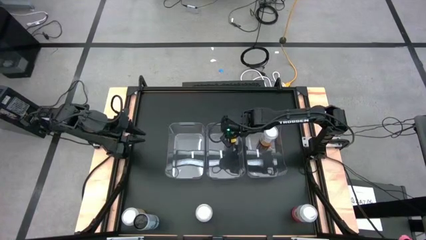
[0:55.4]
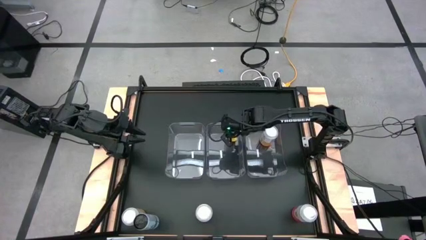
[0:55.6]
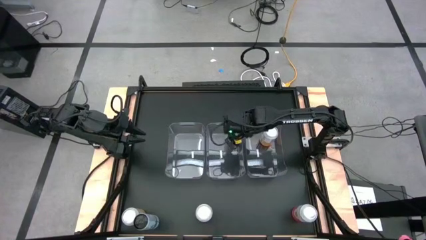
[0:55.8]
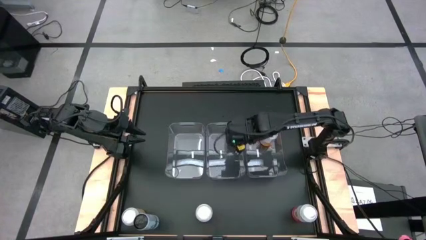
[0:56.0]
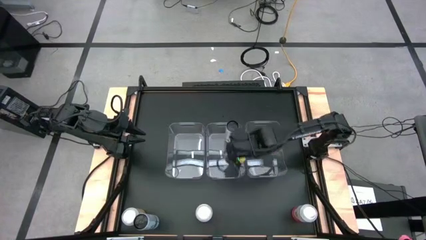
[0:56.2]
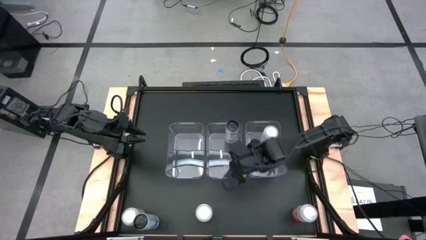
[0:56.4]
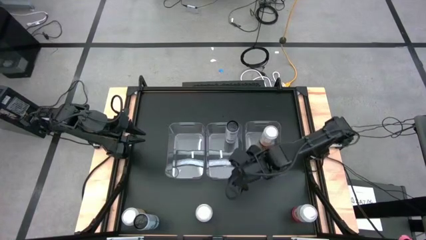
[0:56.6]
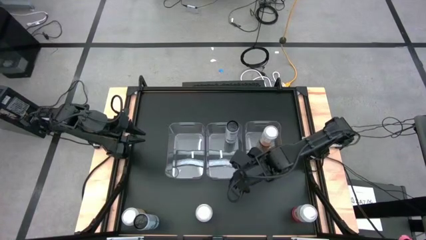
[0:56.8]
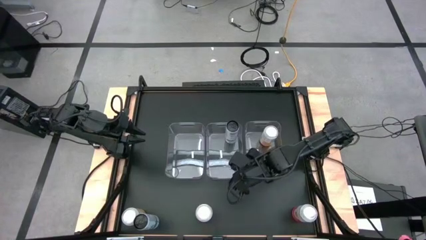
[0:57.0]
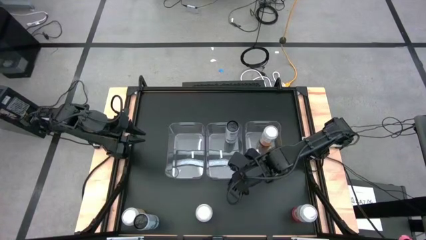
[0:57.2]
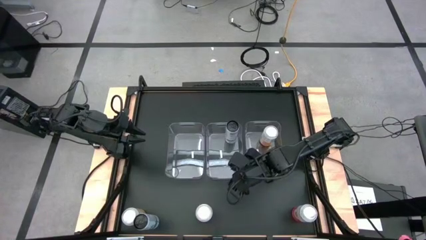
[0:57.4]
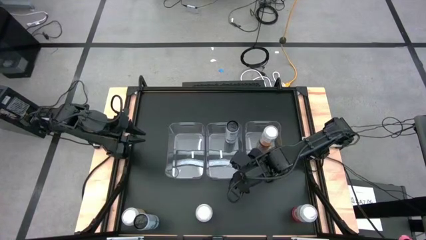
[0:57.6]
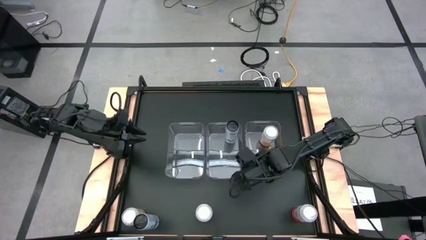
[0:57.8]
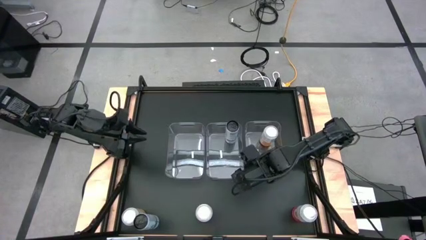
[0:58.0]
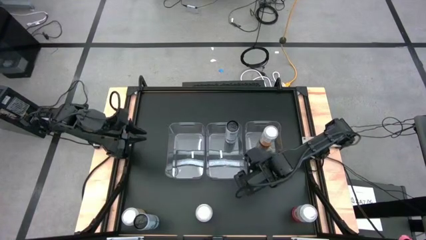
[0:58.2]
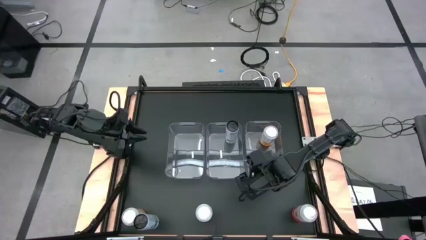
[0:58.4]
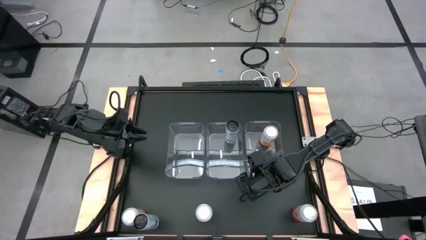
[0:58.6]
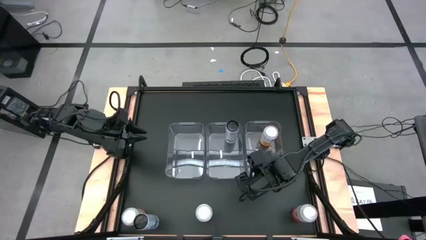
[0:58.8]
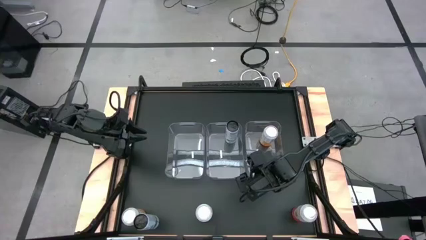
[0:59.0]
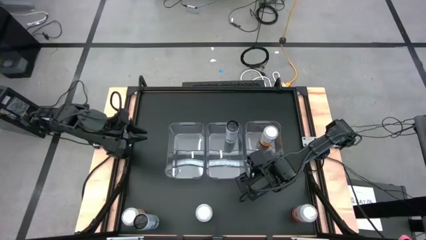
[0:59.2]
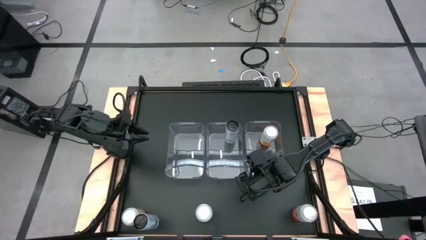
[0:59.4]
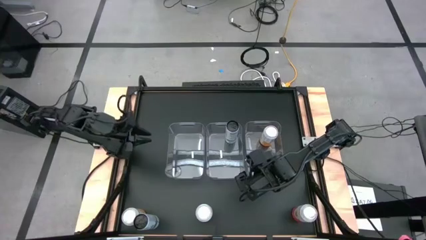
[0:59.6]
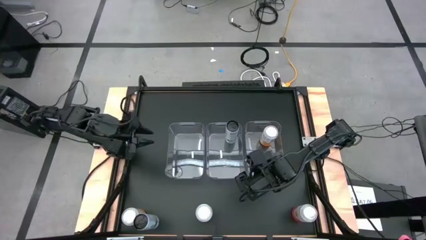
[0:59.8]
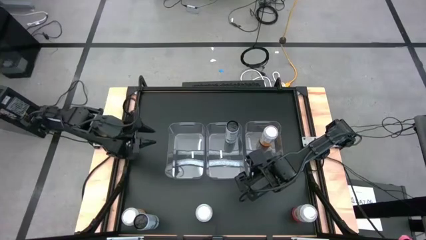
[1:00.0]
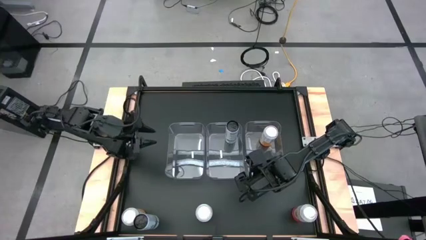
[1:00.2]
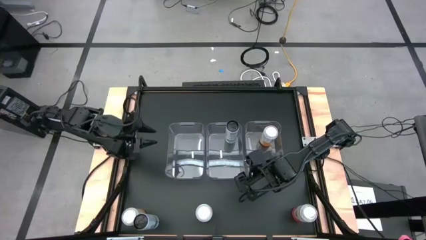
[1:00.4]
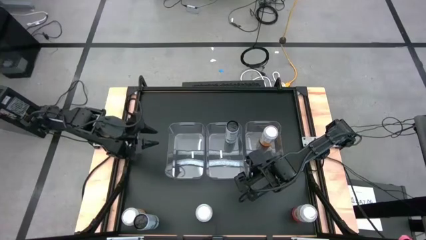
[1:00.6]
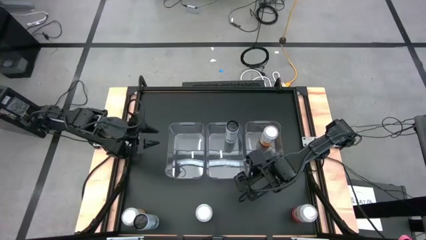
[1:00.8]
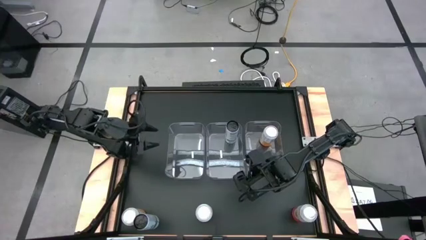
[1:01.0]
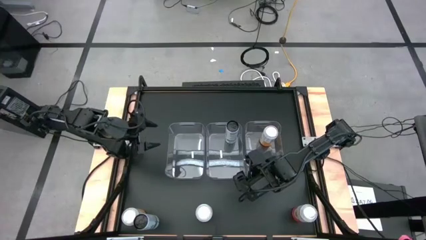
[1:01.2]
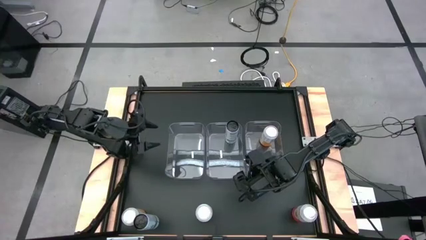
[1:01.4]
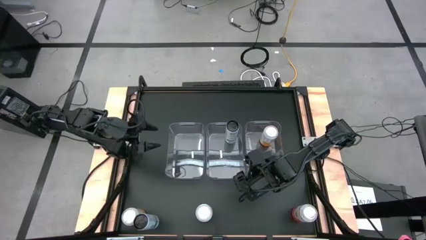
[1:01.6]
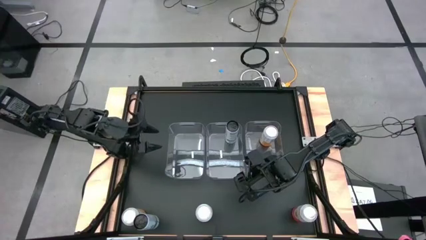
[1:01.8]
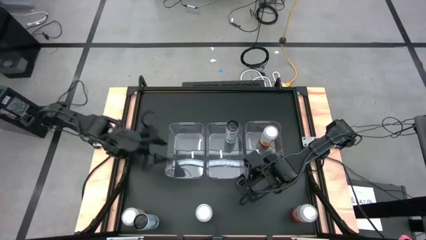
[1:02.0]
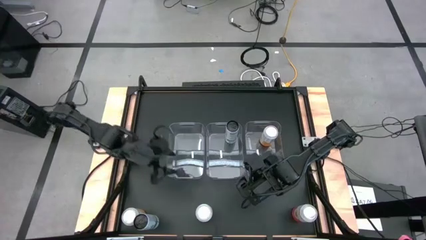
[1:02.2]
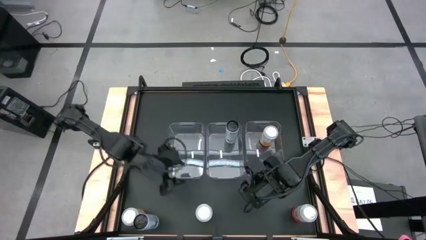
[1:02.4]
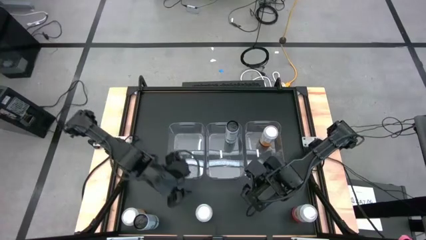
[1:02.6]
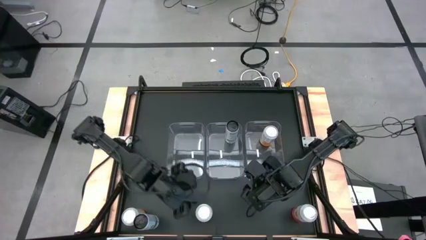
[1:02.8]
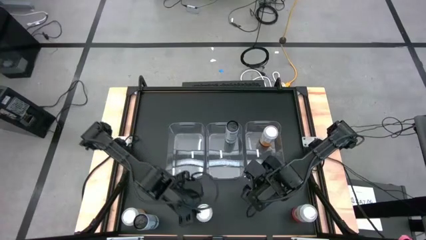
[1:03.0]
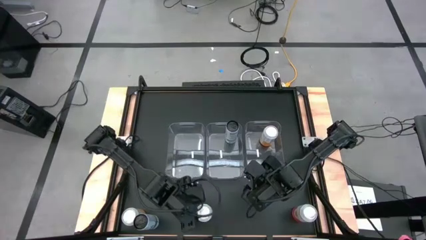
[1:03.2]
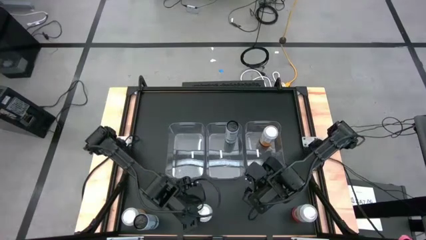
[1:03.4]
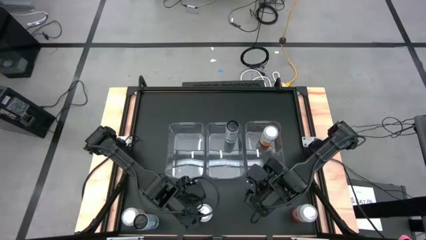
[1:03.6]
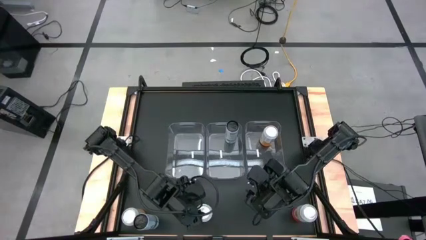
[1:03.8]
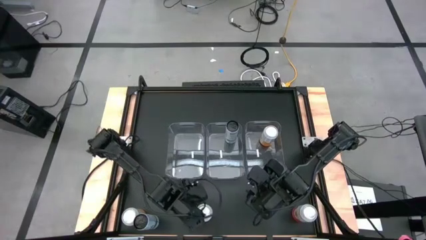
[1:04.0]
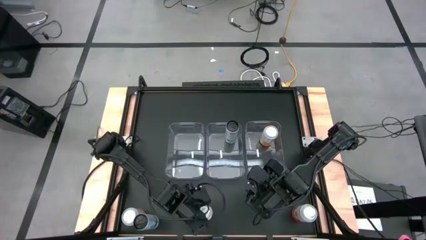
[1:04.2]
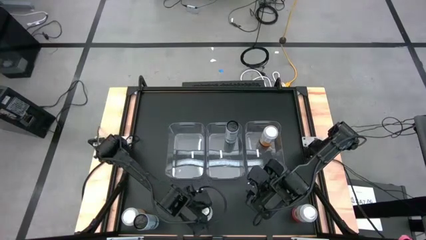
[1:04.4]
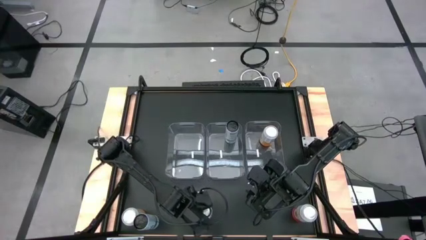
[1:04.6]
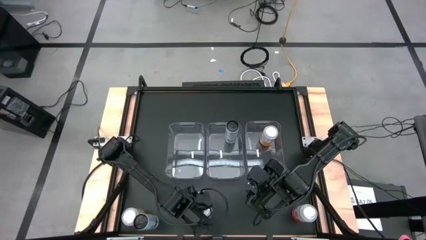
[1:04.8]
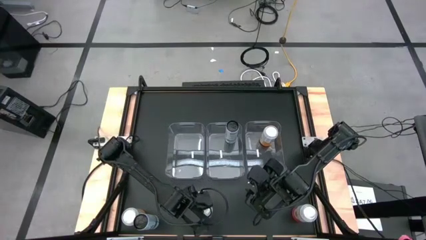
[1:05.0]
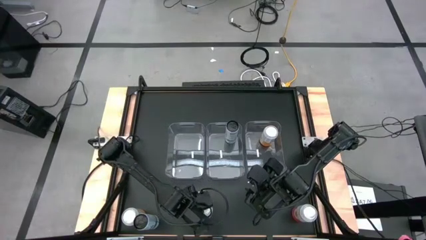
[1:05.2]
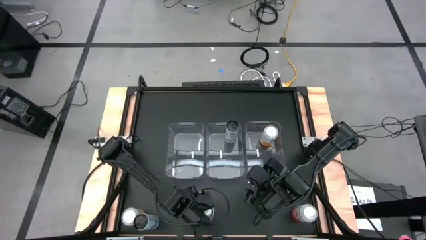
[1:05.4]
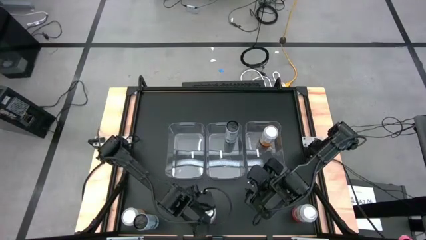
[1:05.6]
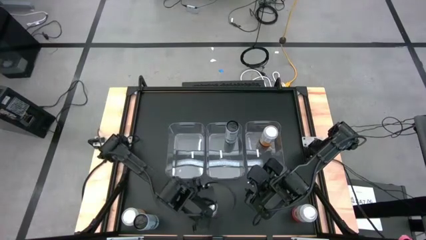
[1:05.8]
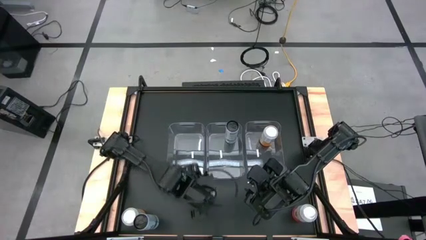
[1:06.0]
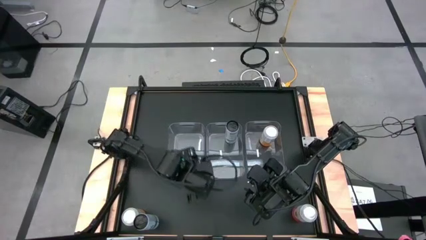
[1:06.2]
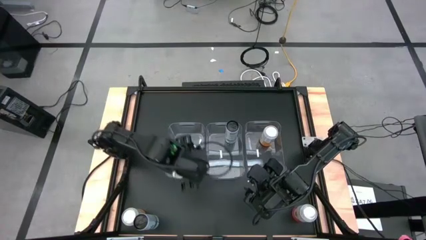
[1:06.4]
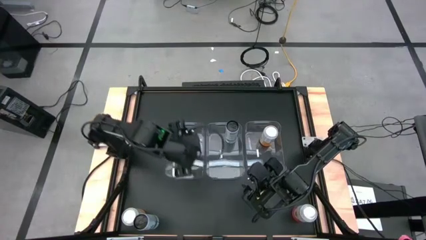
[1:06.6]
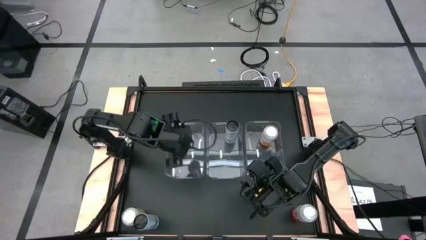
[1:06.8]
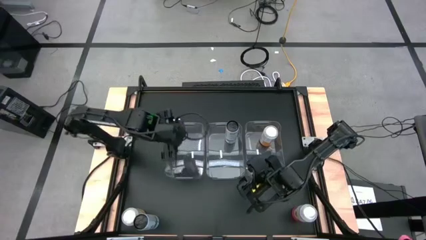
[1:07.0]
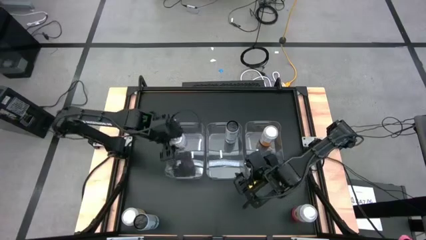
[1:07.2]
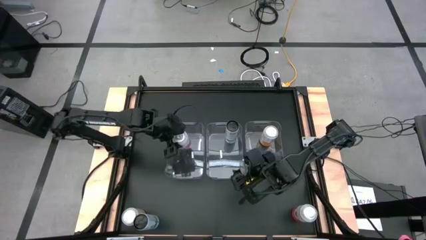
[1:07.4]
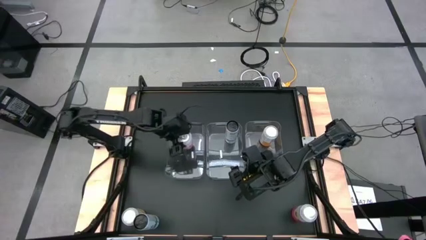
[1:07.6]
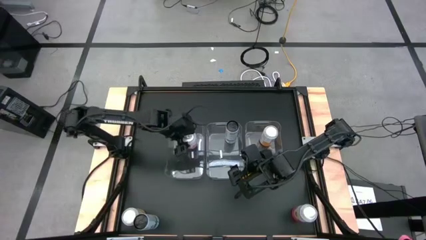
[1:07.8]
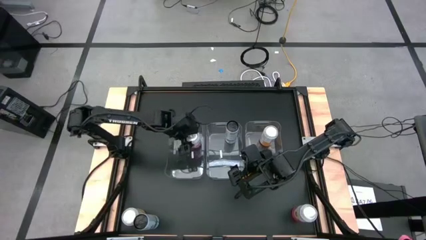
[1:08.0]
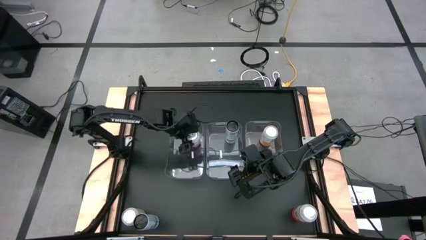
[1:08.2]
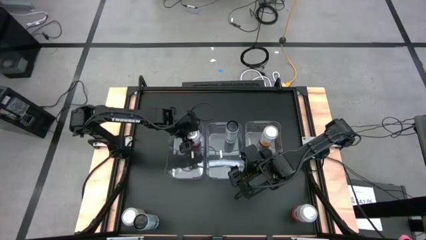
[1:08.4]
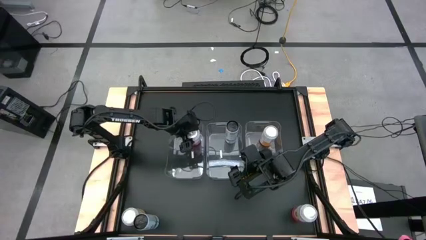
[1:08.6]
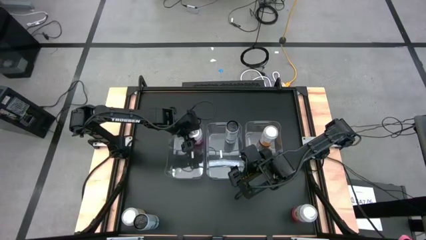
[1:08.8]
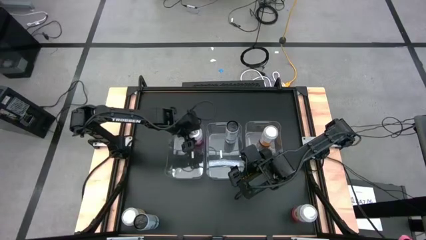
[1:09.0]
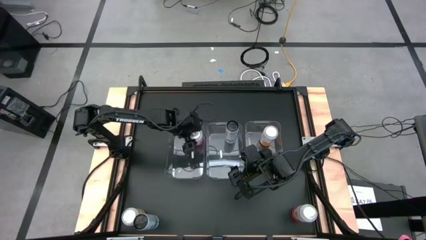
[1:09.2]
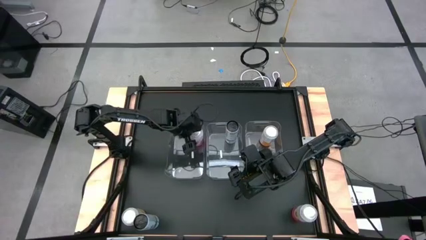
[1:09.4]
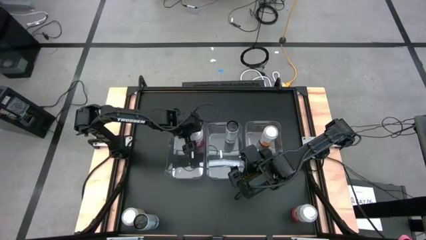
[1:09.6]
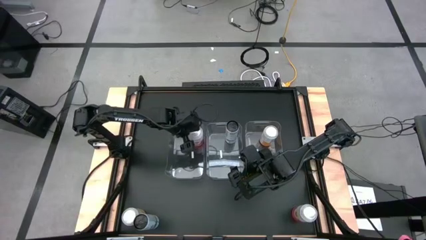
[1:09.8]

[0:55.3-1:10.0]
Task: Sort soda cans
Put the left pink-white soda can into the left transparent bin

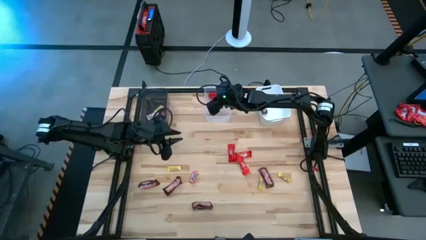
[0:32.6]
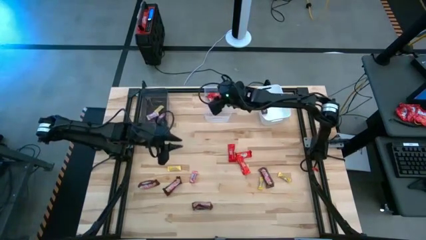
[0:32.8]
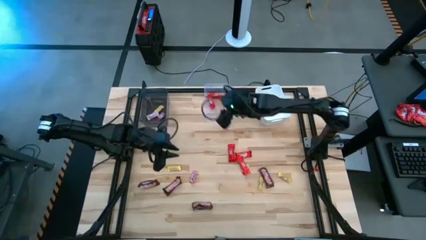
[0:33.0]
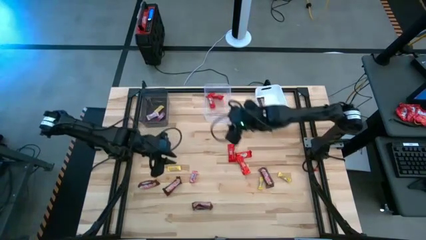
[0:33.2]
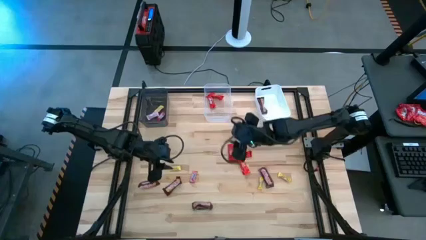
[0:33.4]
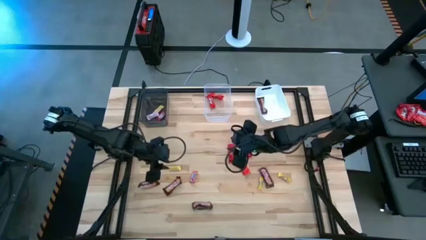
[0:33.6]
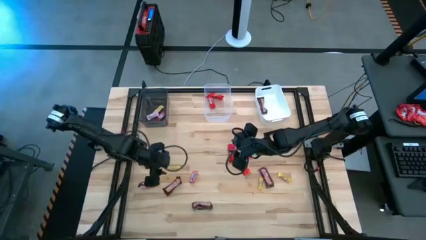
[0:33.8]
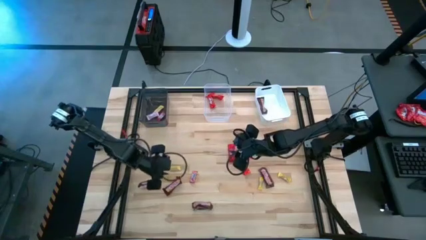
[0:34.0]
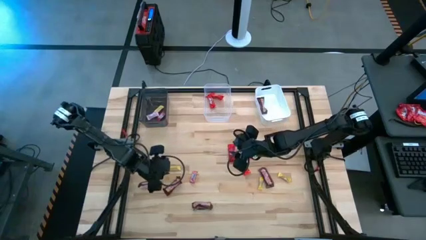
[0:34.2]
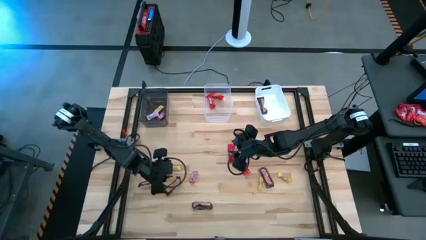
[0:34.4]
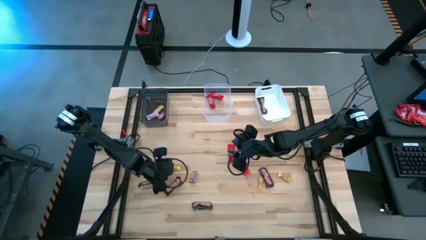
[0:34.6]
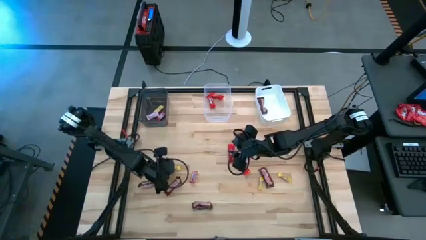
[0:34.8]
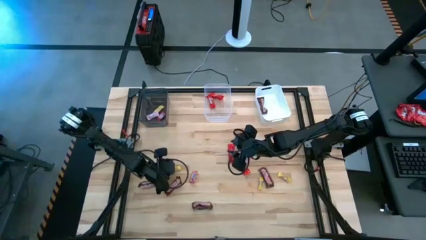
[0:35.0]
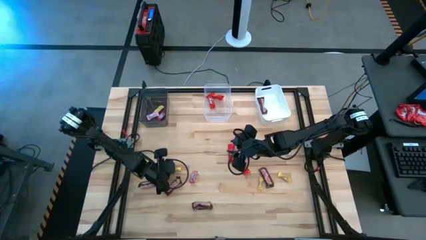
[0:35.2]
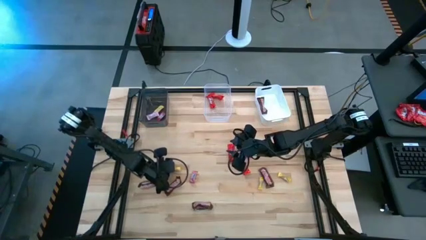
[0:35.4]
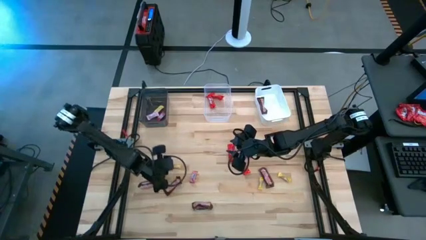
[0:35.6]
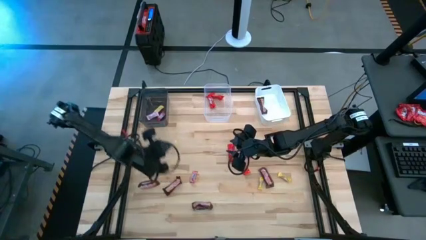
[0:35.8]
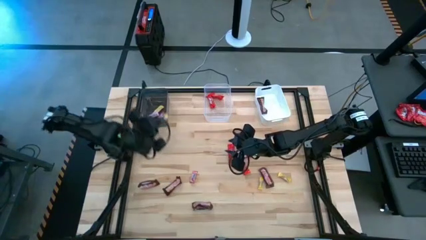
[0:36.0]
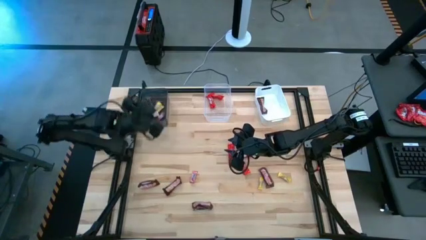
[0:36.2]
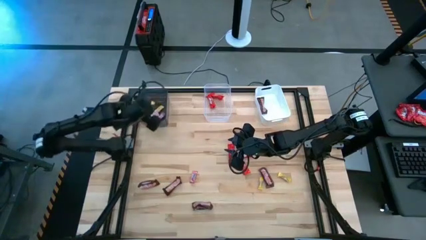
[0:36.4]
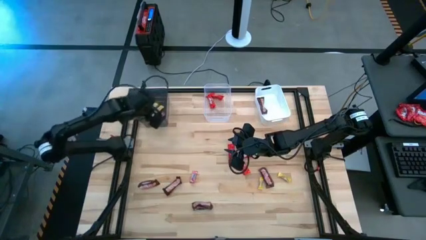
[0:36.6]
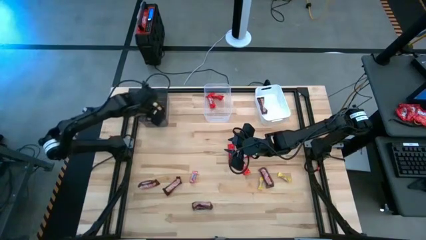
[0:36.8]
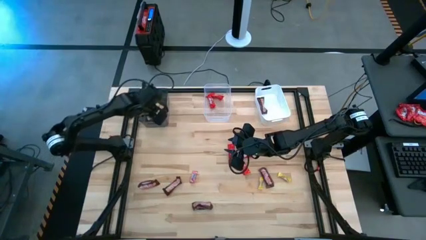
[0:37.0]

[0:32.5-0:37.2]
Task: Sort candy by brand, put in halloween buckets
Put the yellow candy into the black bin
